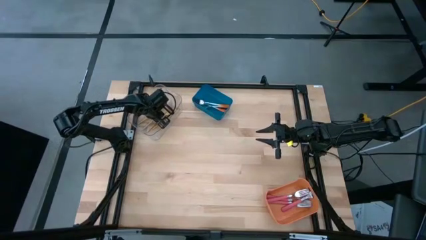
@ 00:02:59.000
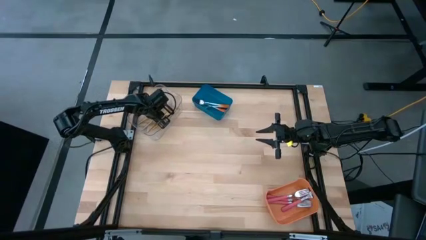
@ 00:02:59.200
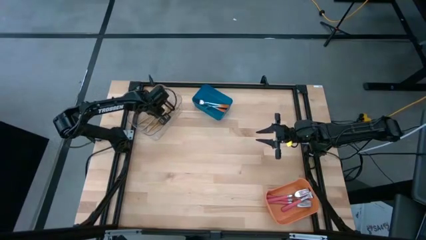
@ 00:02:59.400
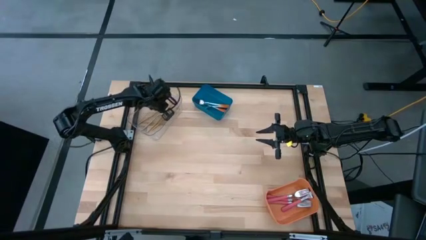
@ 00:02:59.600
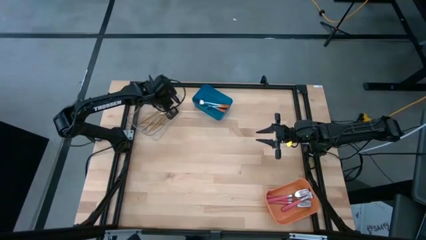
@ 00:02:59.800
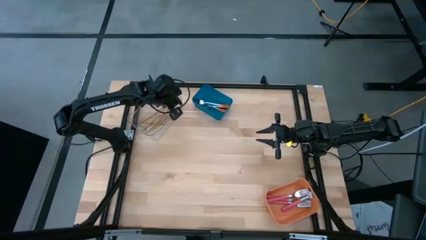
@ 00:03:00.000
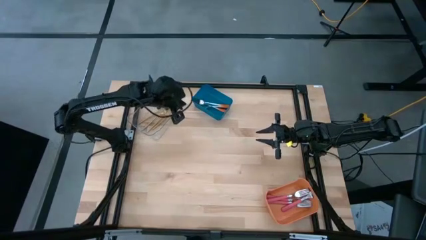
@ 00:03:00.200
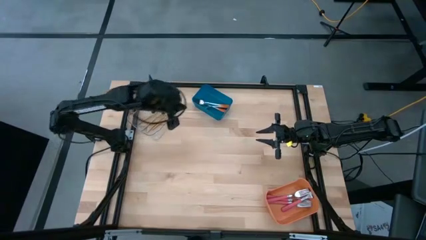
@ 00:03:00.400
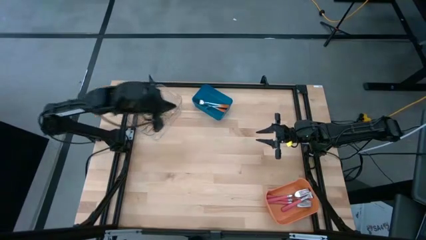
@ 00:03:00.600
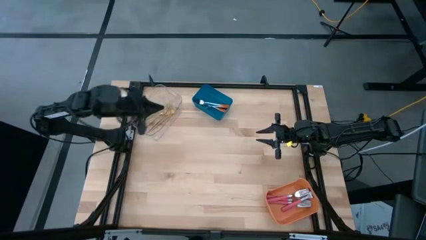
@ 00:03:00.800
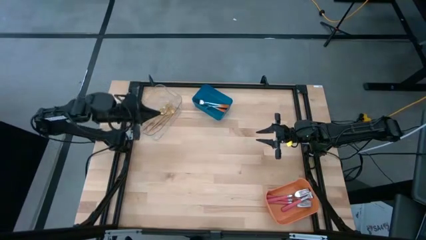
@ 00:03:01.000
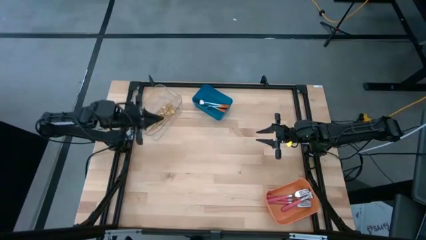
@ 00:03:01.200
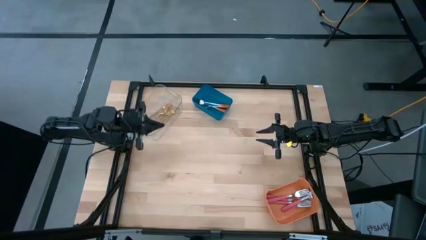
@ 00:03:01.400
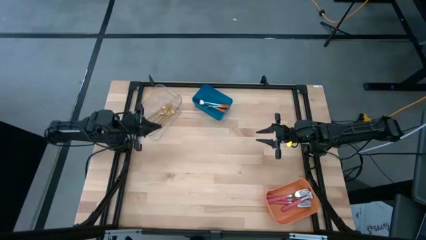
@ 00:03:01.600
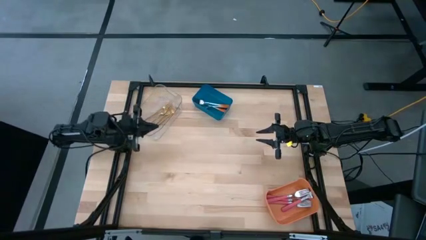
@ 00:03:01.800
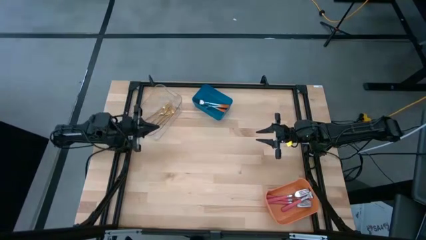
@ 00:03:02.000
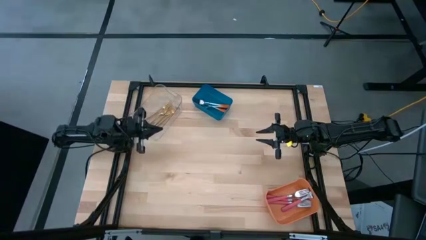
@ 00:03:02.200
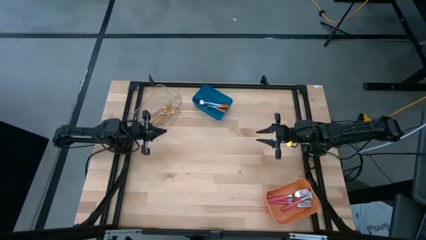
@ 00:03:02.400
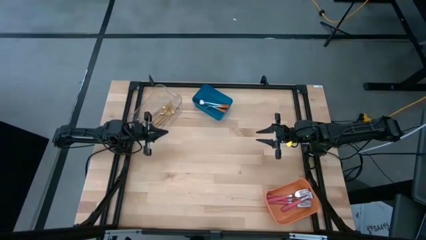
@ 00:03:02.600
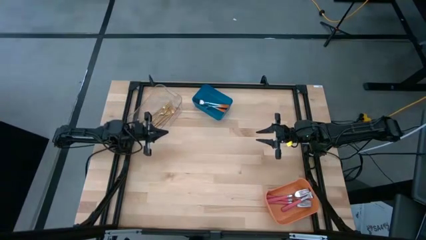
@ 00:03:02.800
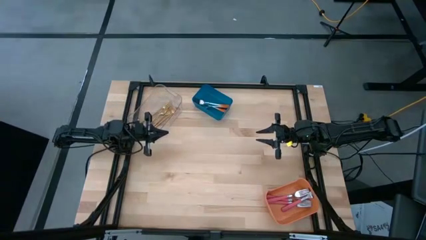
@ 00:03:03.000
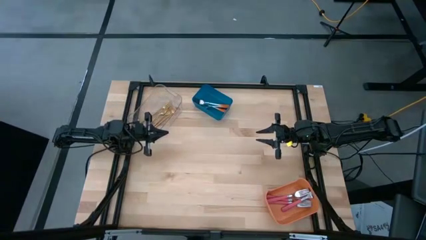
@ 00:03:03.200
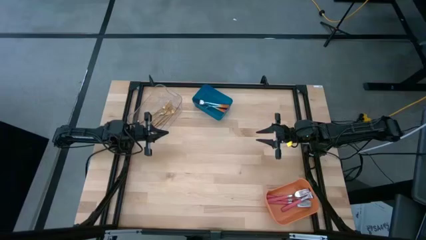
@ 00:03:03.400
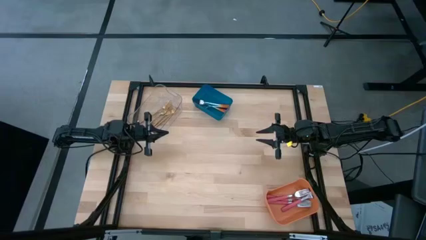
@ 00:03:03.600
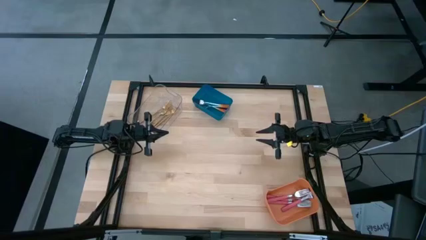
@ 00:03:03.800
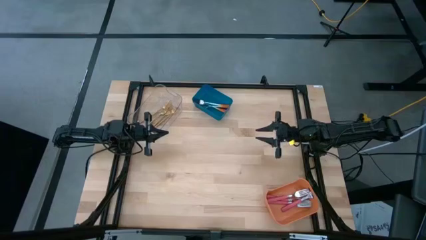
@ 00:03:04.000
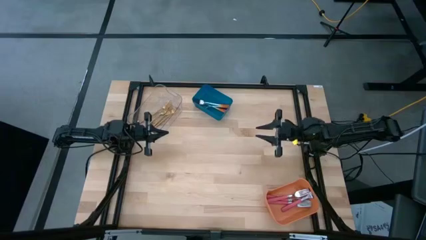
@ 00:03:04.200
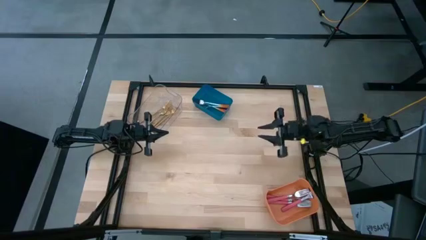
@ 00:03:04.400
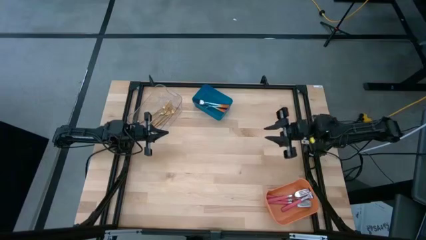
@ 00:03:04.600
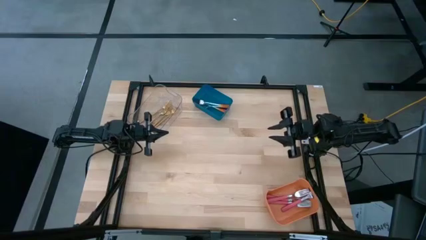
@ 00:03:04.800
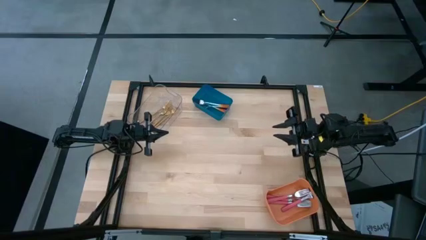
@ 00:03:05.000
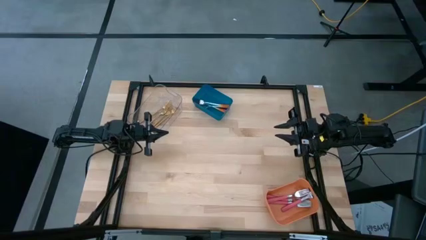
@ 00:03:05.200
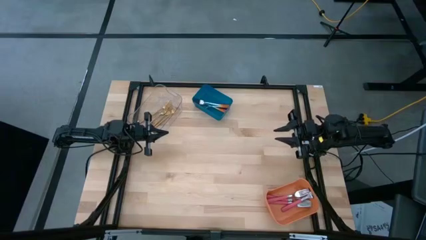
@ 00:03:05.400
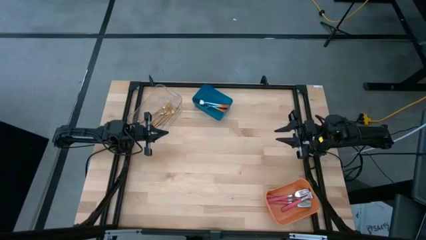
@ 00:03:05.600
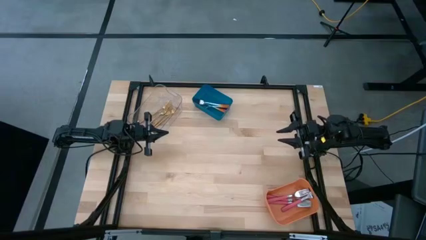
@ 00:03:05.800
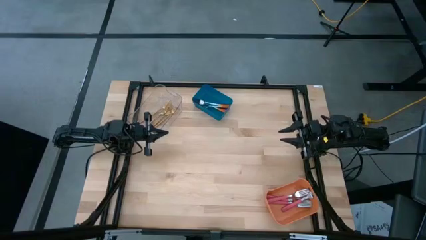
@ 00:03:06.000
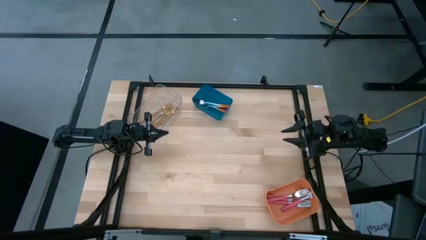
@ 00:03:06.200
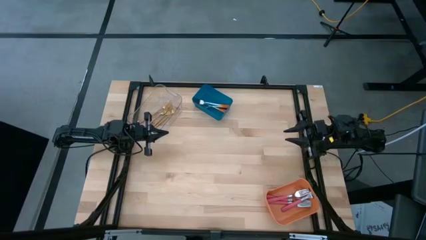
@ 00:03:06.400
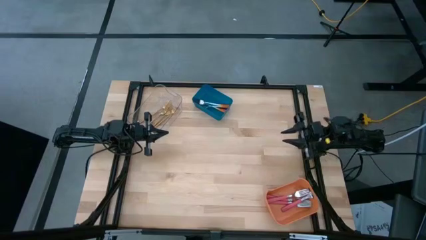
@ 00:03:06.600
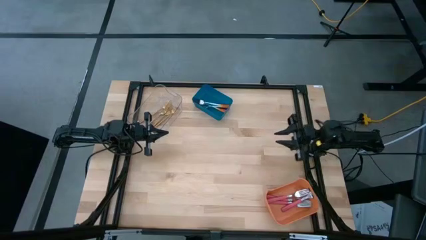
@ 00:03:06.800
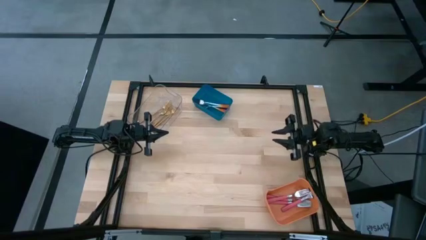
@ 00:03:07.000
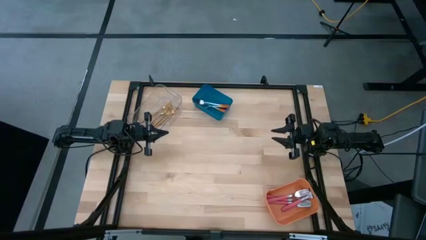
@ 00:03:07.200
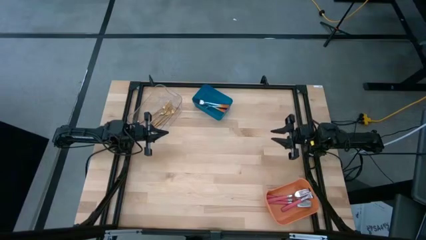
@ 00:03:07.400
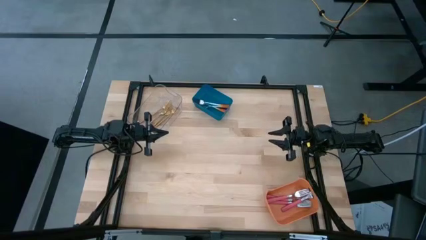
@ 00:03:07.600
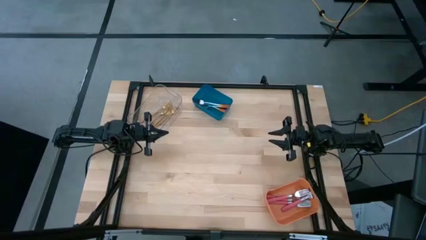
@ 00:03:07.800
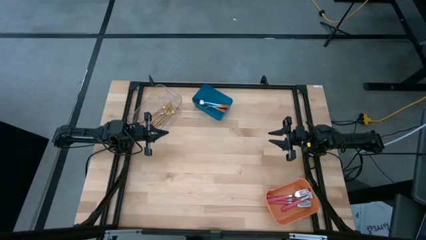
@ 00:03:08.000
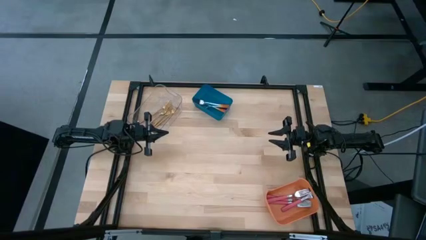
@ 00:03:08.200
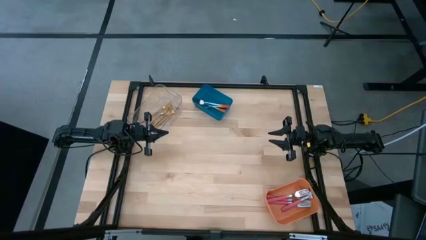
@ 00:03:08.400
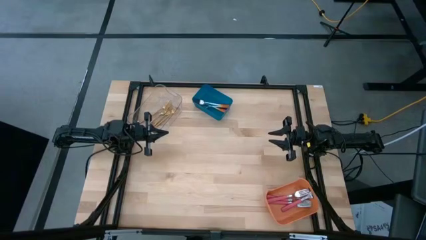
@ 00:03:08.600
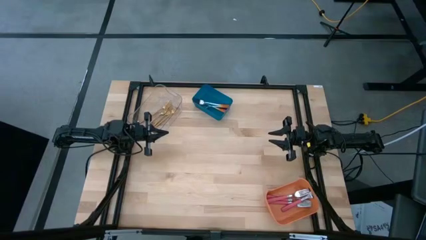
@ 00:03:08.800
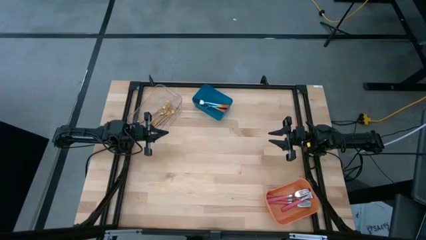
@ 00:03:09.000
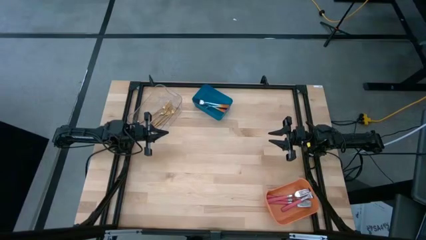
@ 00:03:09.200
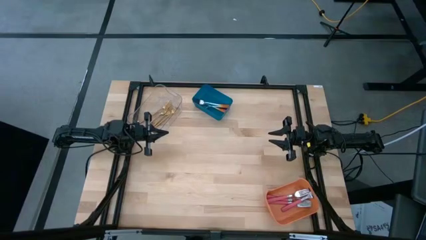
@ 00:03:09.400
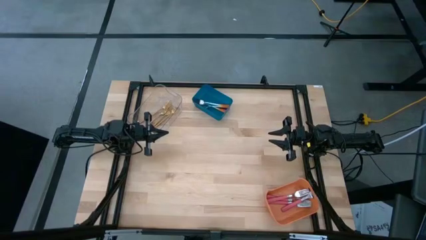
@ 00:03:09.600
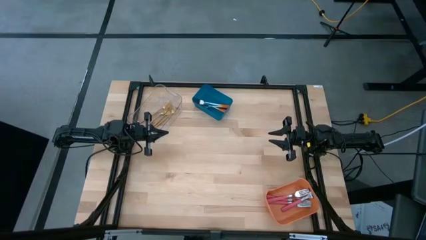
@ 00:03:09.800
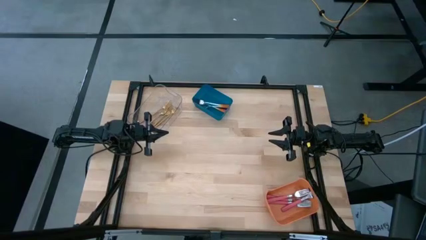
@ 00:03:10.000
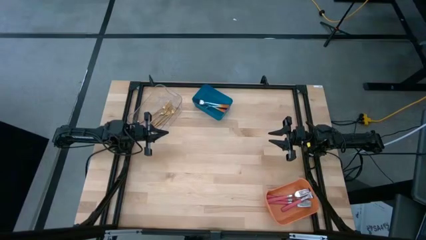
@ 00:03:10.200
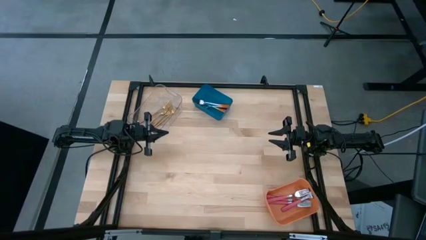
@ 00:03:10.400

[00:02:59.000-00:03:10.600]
Task: Sort silverware by color (type)
Return to Home Position
